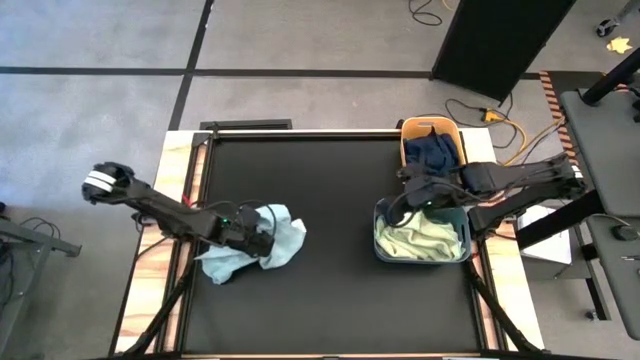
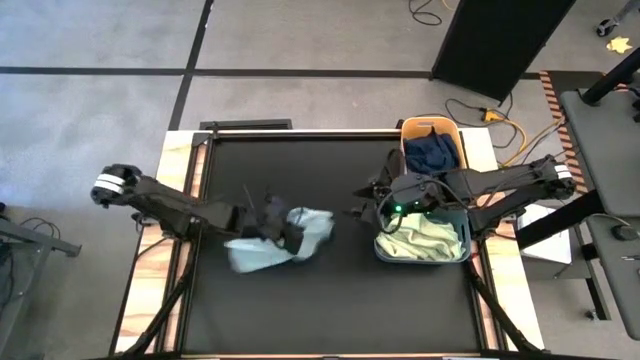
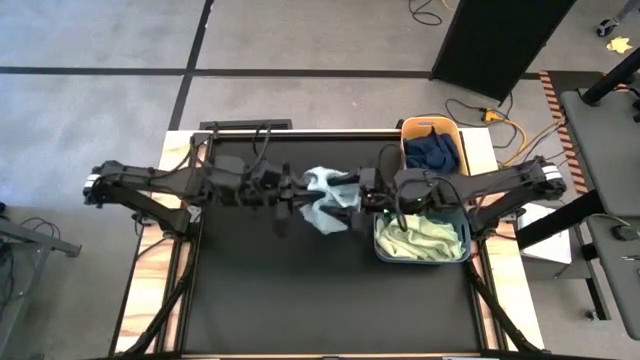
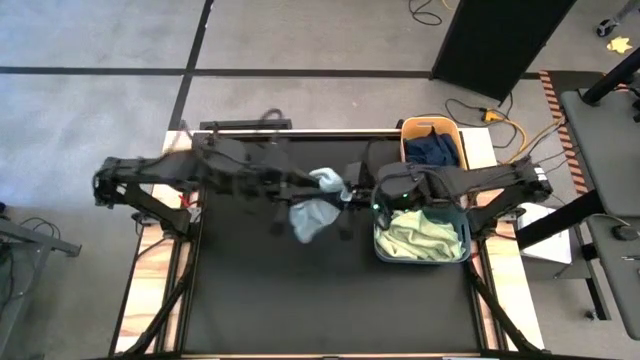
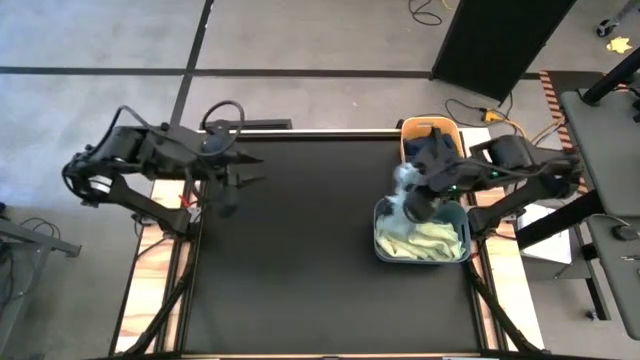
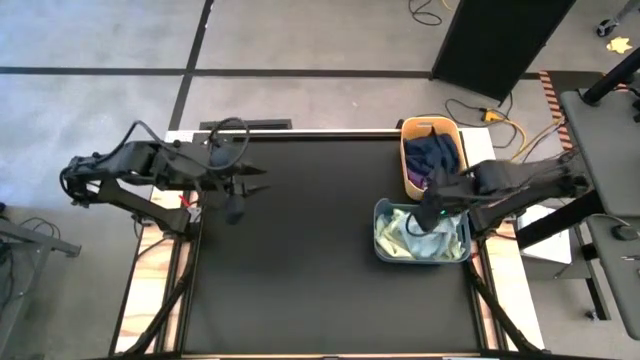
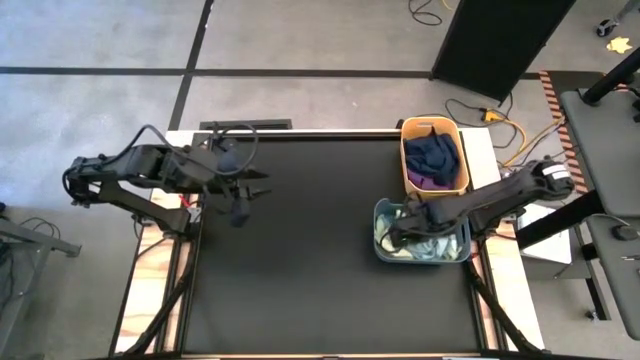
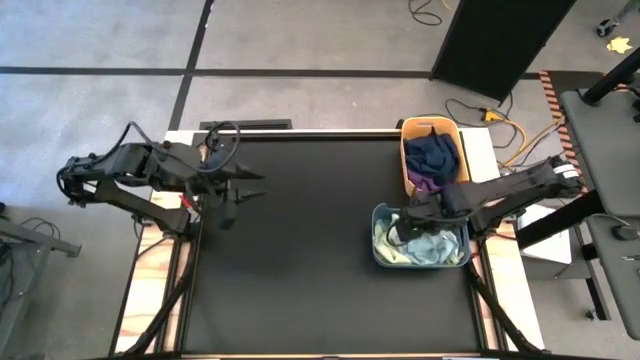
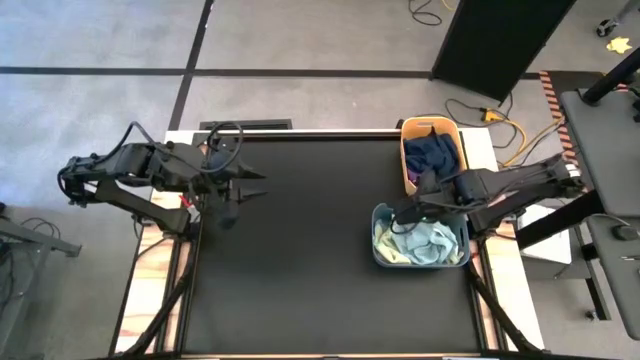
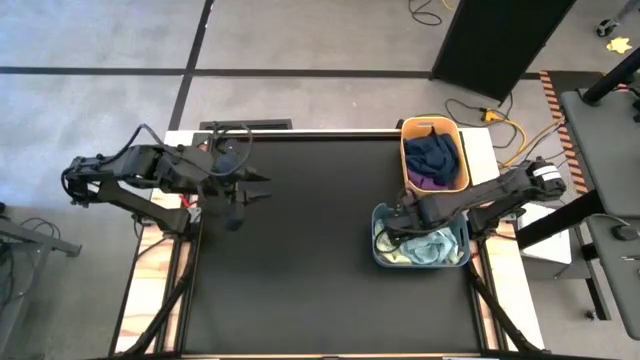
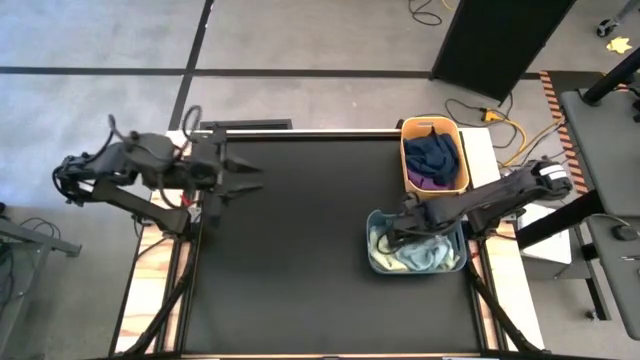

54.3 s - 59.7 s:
Task: Sort towels by color in basket
Put the light blue towel into the light gray bin

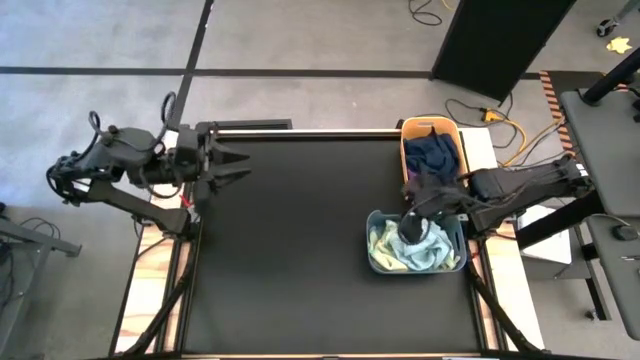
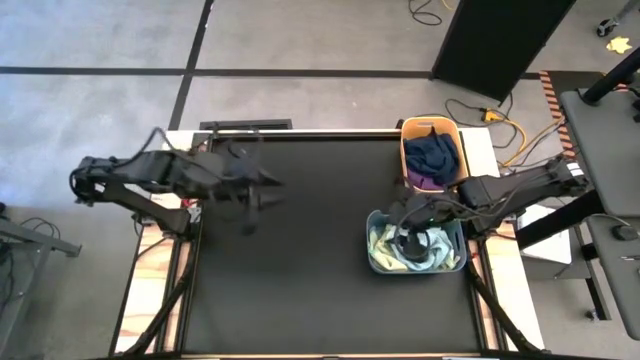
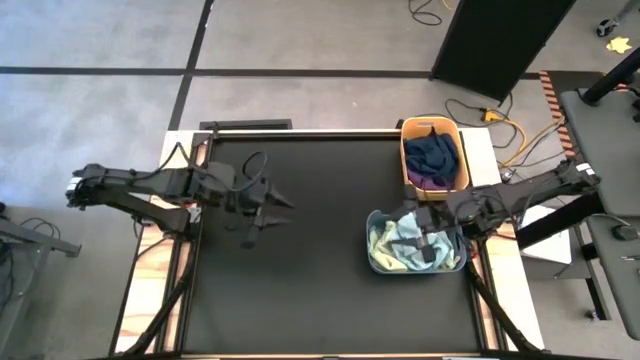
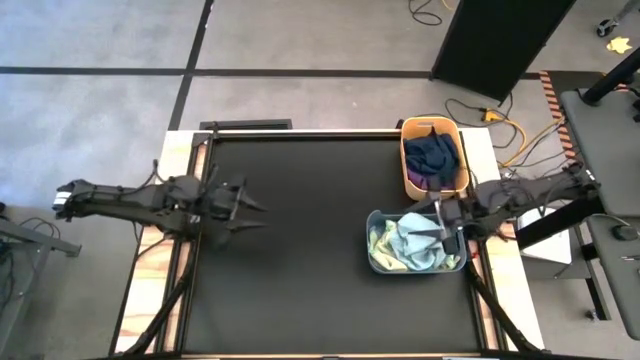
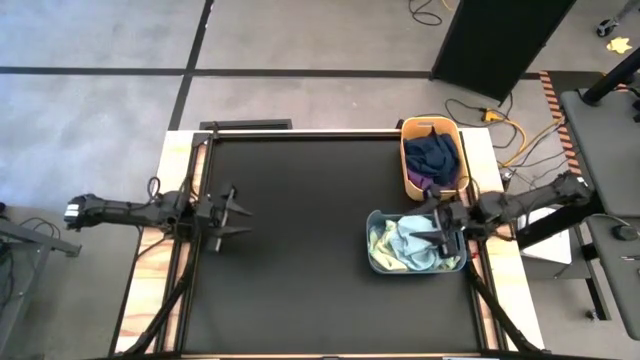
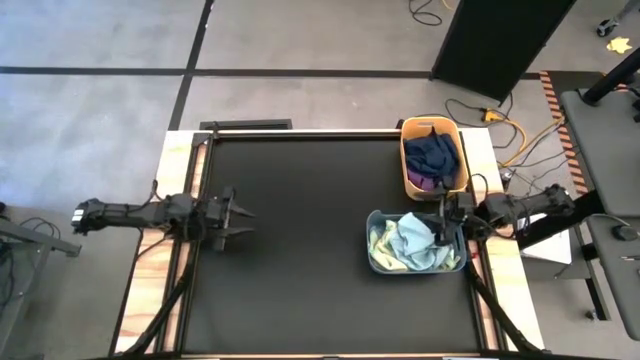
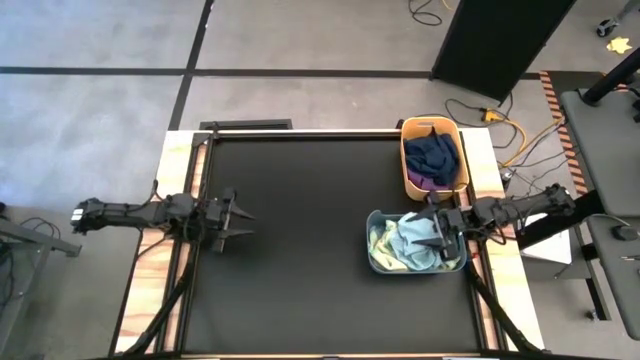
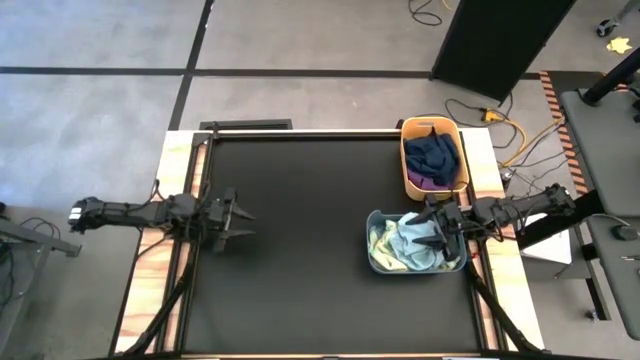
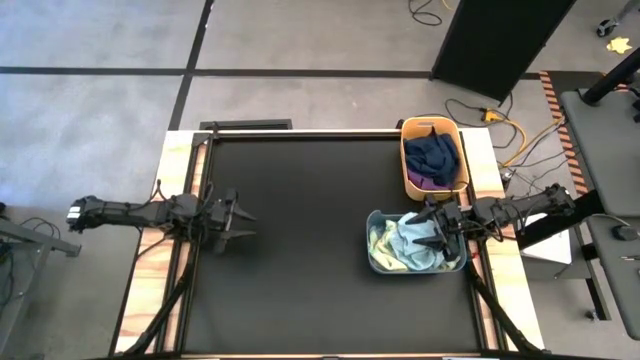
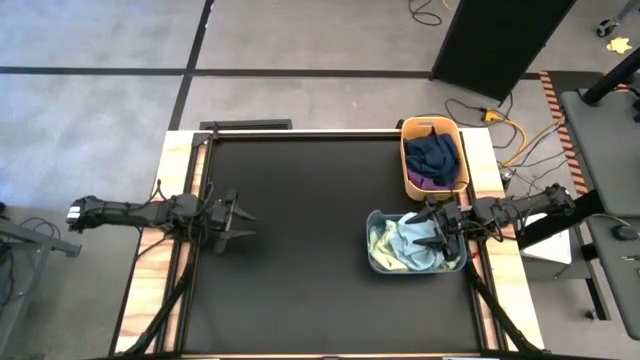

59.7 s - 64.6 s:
Return to Home Position

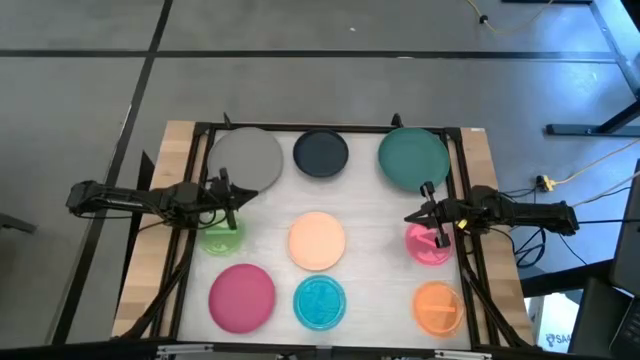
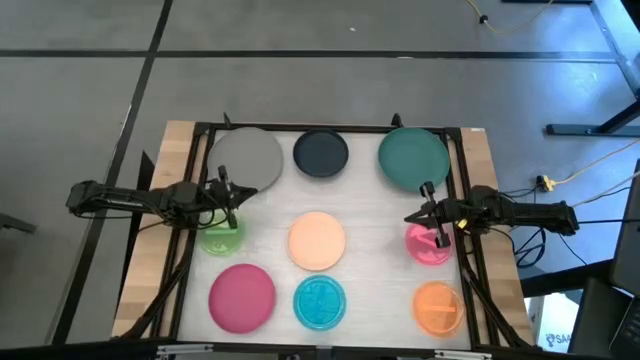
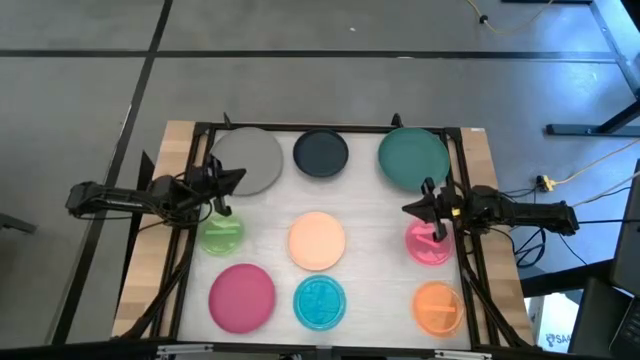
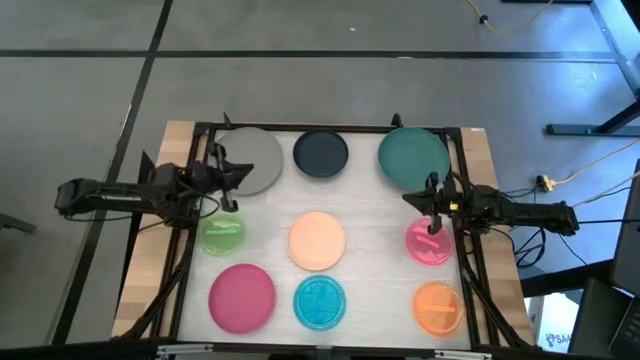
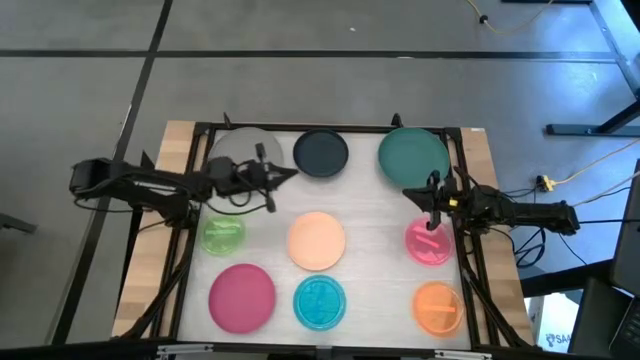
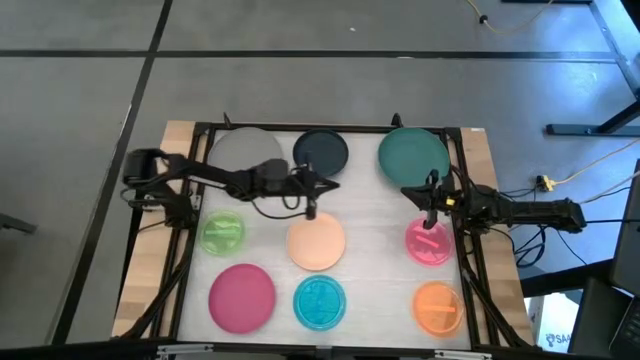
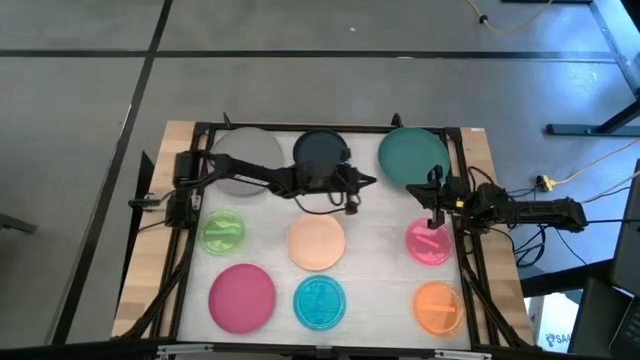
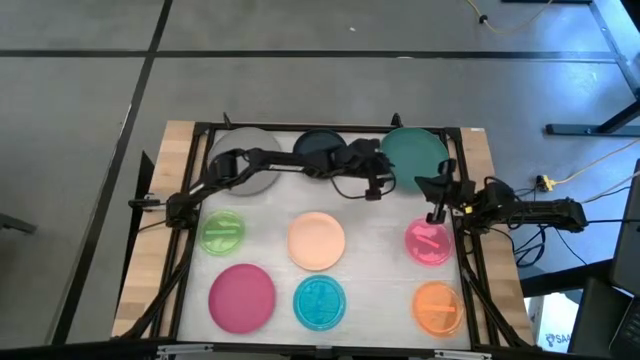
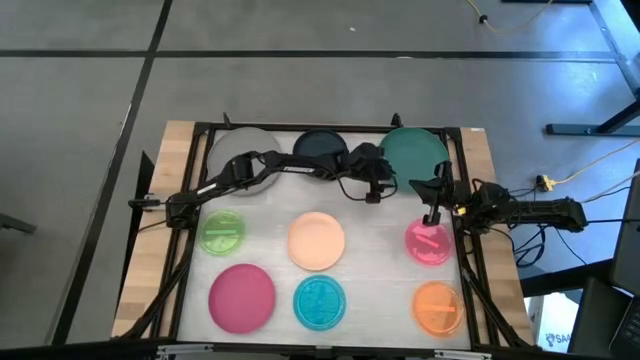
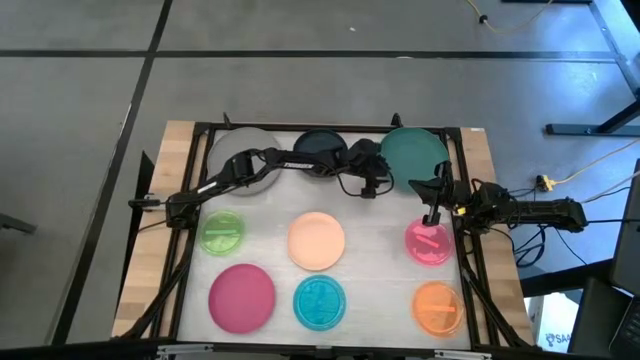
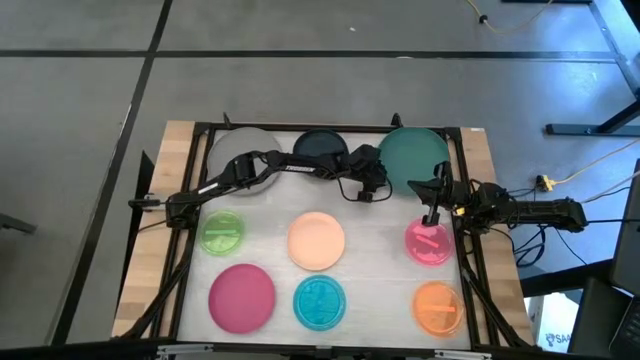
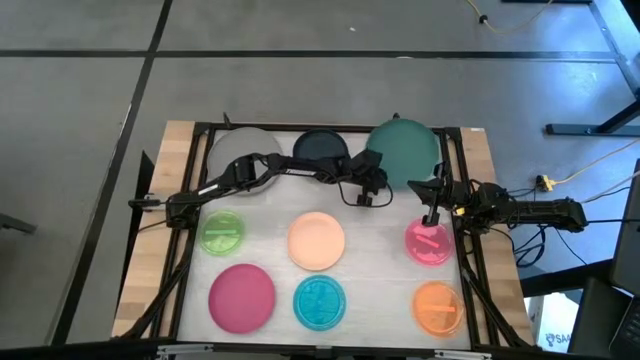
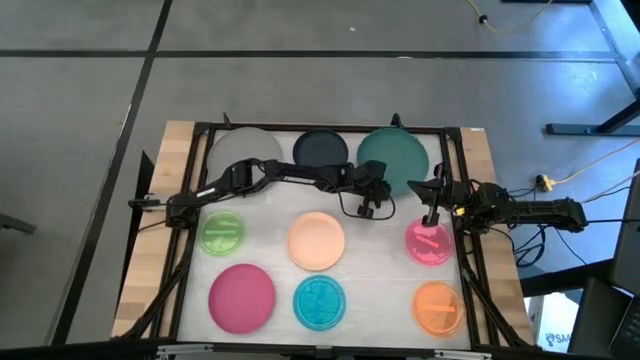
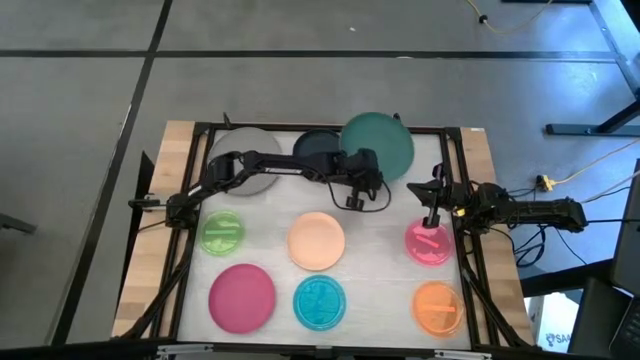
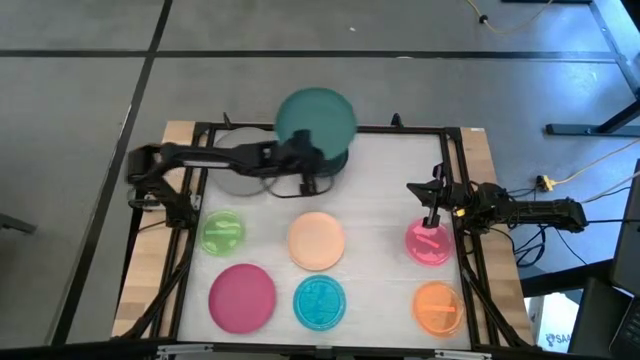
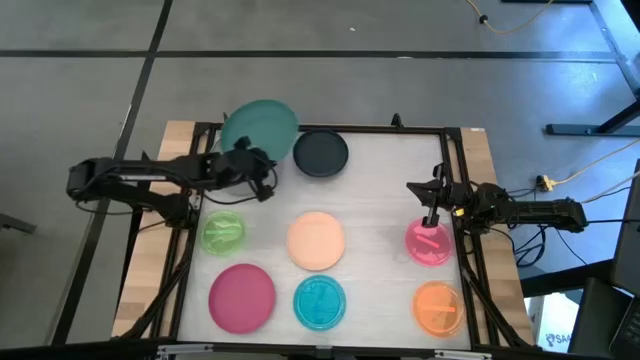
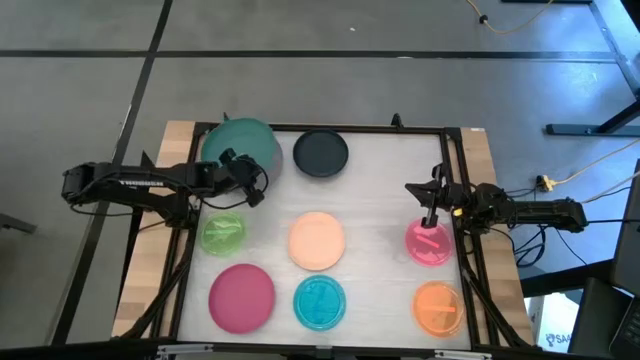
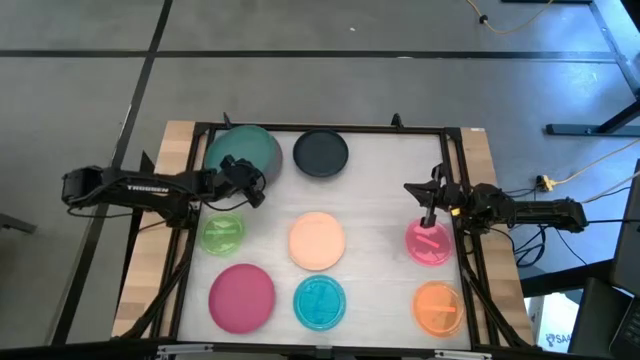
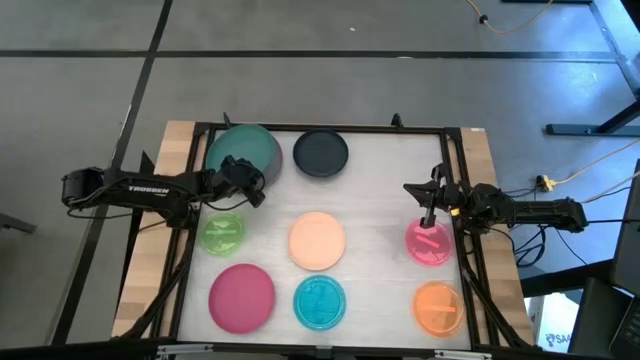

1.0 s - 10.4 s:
Task: Stack plastic plates
Stack the green plate on top of the gray plate
